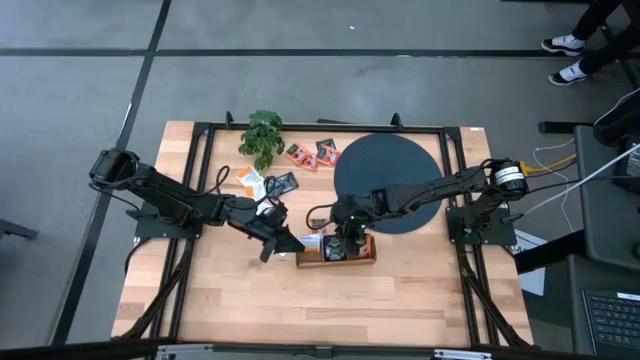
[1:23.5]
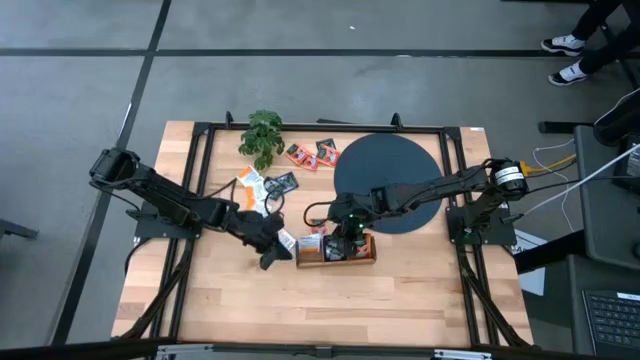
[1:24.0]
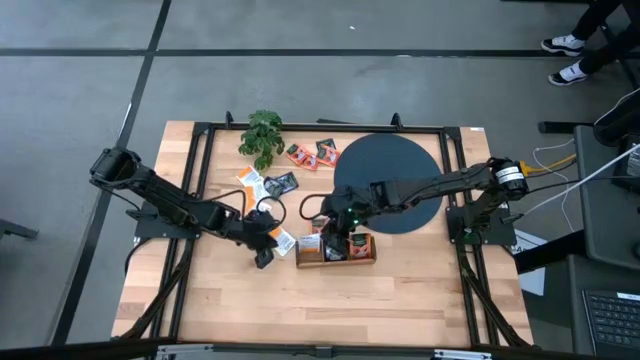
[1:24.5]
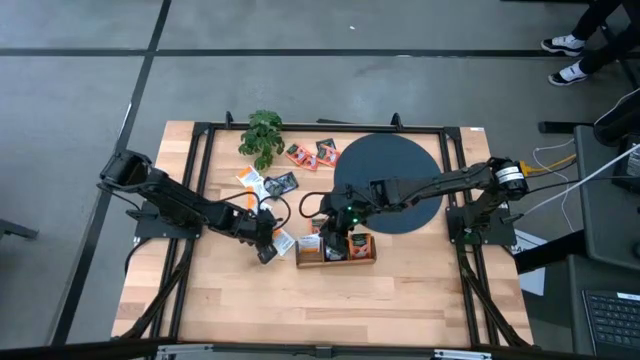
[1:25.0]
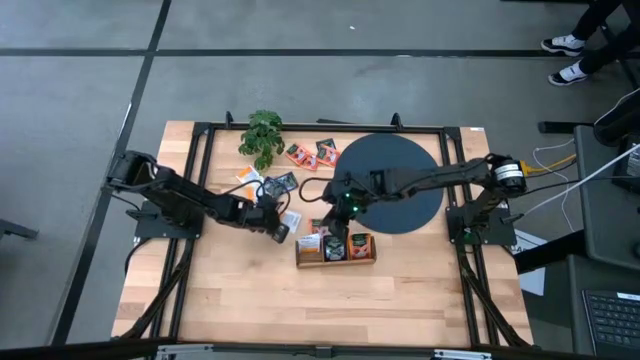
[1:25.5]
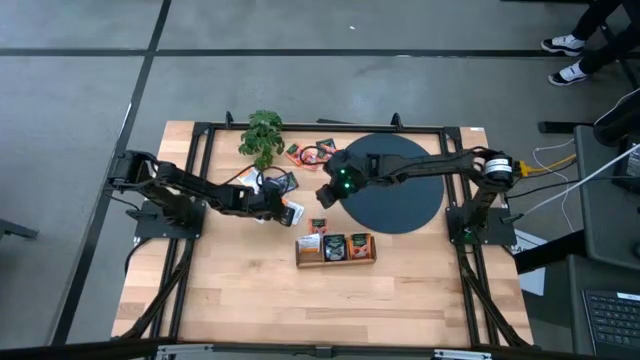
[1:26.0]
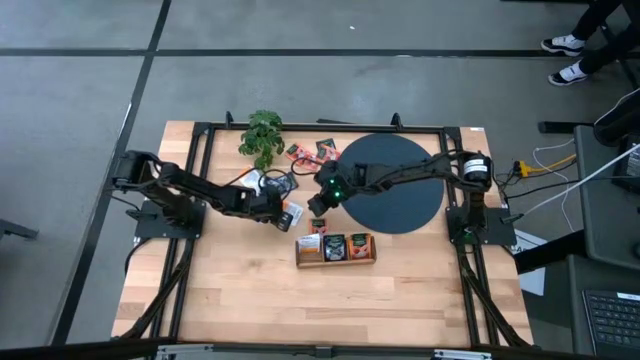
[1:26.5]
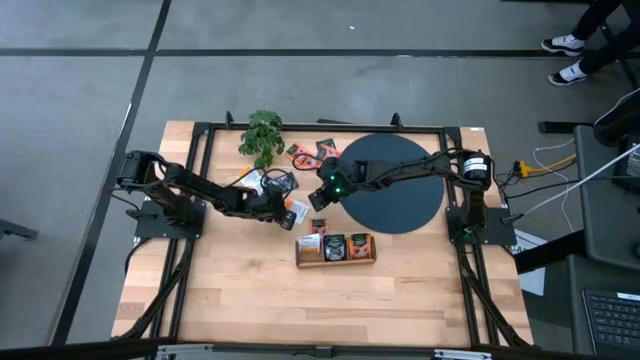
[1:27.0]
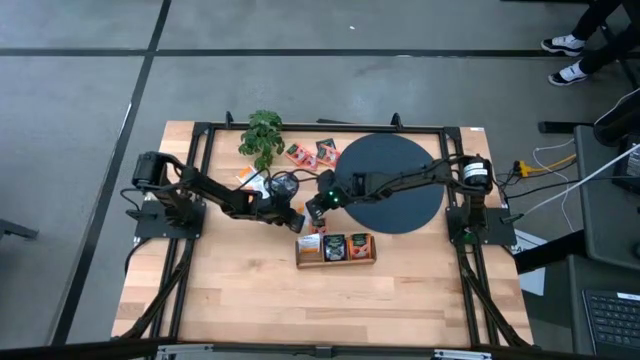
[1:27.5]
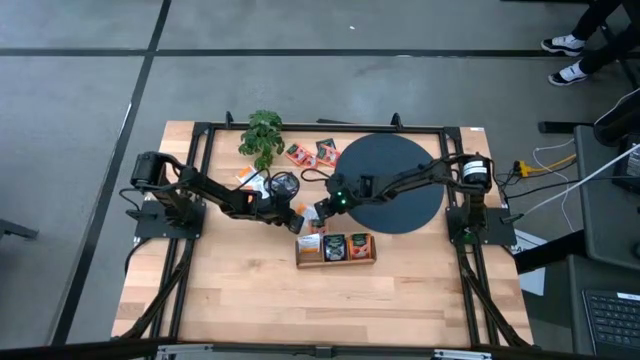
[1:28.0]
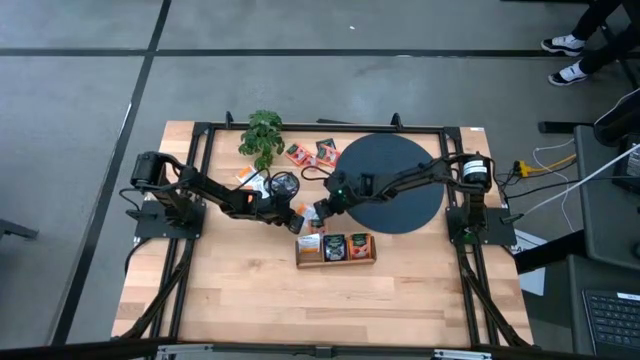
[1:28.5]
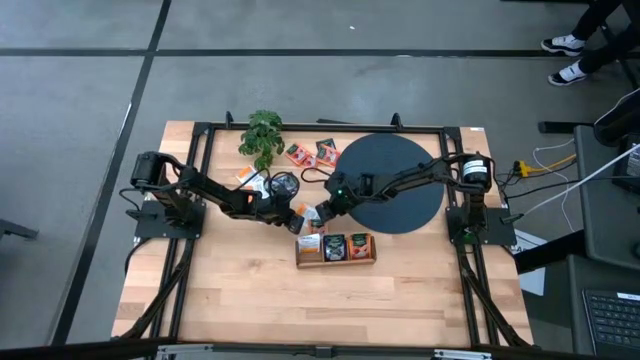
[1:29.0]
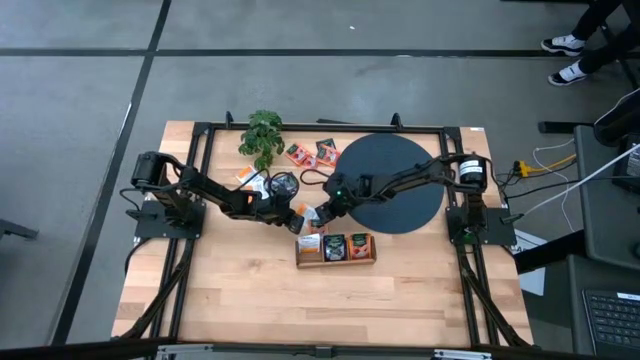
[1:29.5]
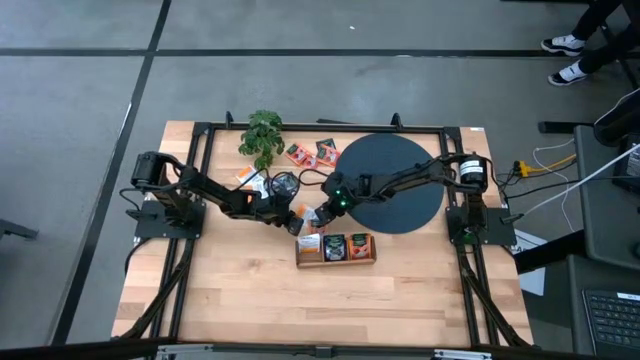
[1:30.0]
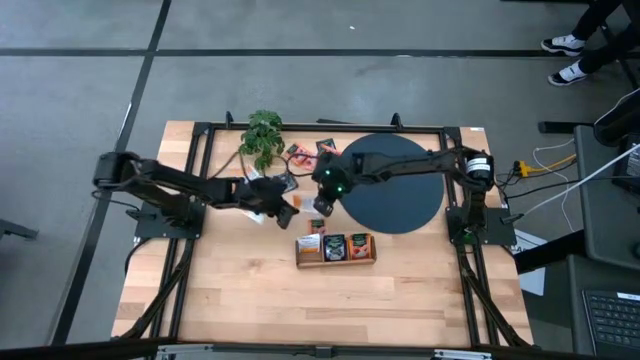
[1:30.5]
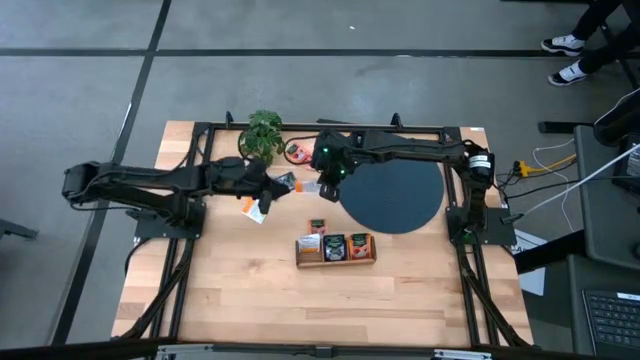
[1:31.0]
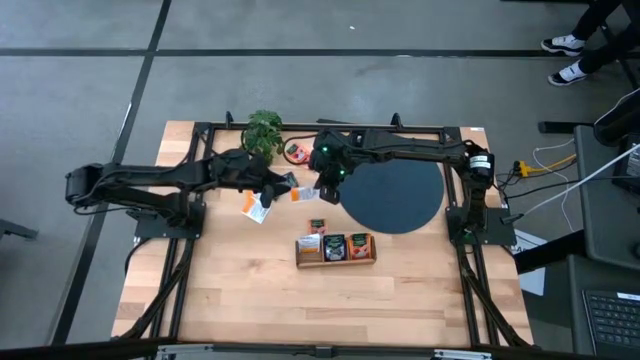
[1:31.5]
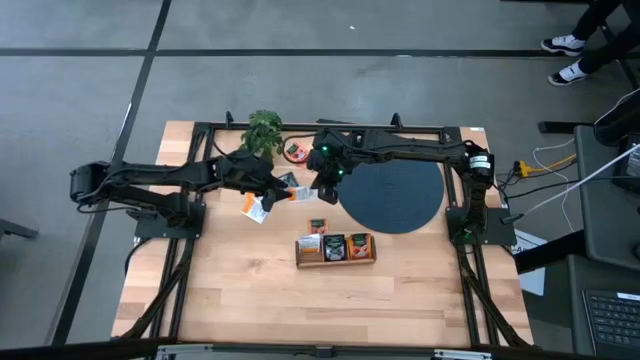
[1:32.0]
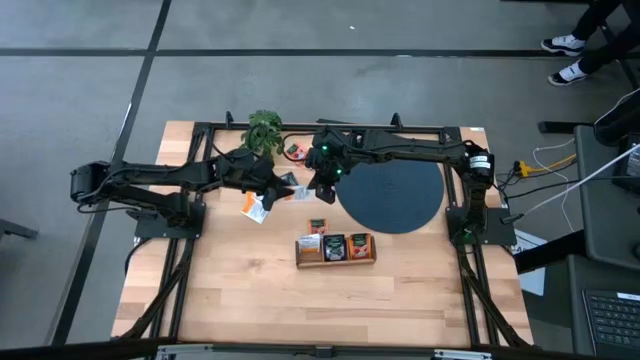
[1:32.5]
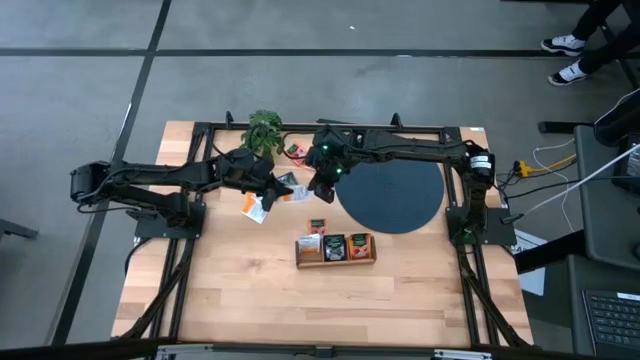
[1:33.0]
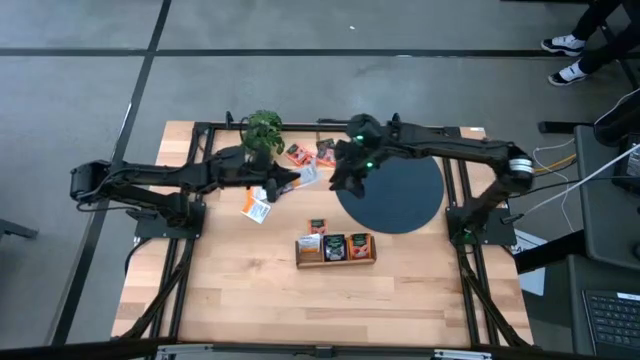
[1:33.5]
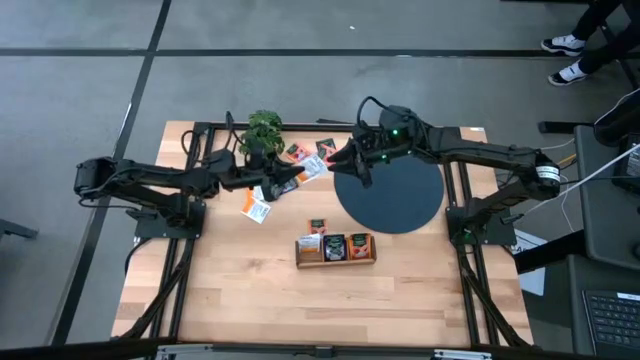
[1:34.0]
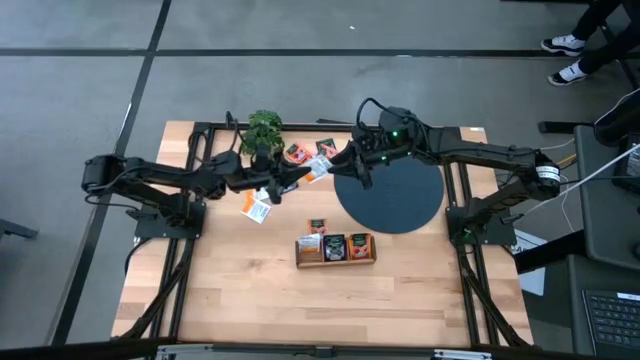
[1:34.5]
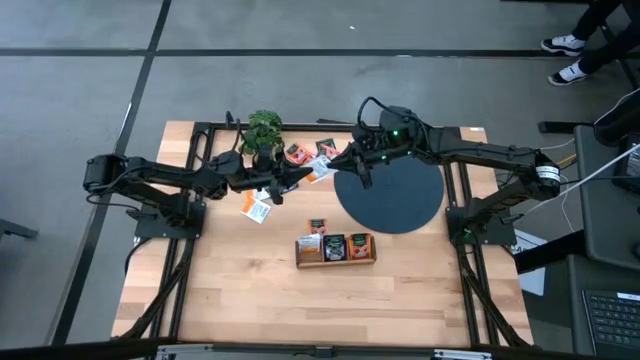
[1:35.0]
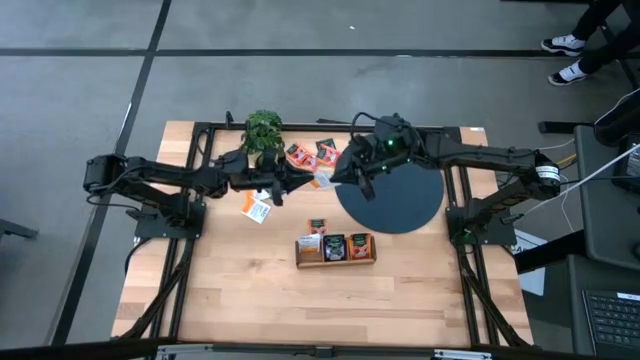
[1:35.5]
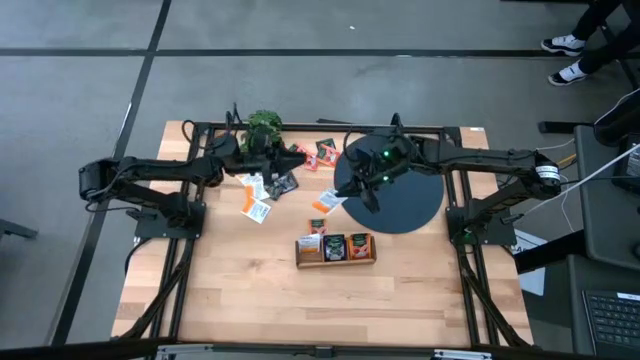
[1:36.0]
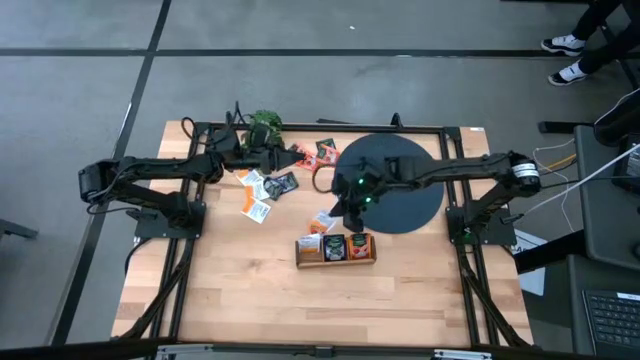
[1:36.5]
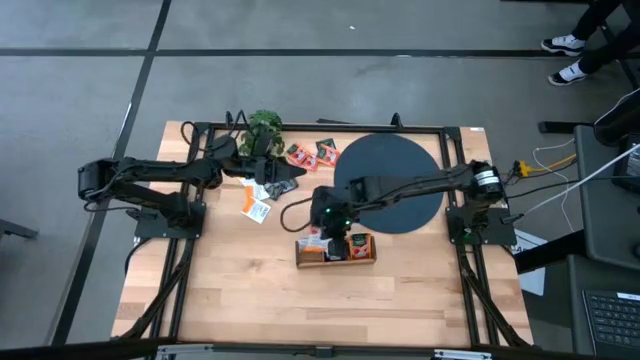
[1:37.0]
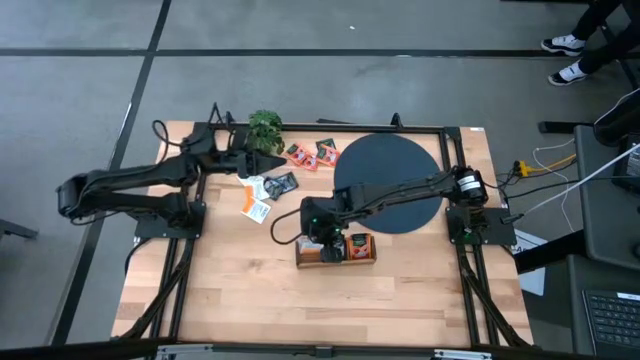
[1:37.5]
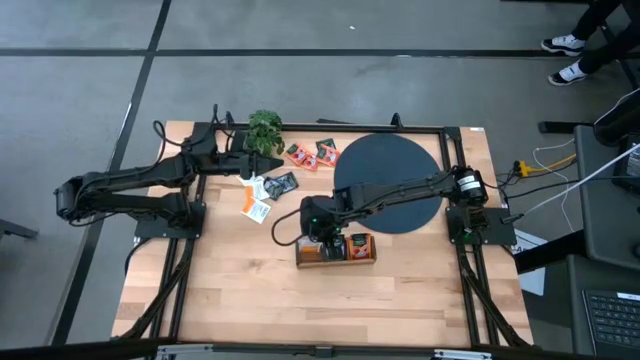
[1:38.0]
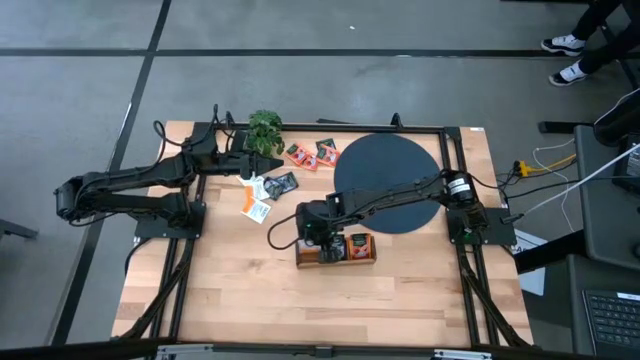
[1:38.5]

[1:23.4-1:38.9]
Task: Pick & Place Tea
Put the white tea bag into the left section of the wooden organizer

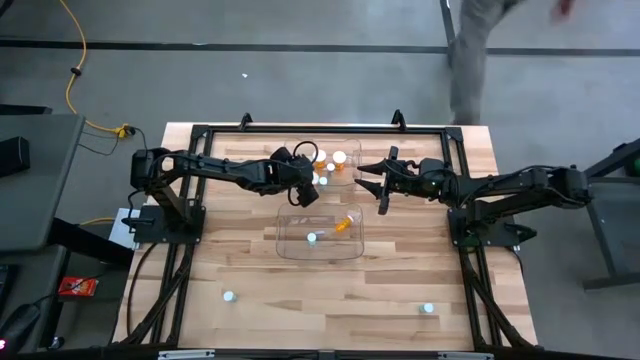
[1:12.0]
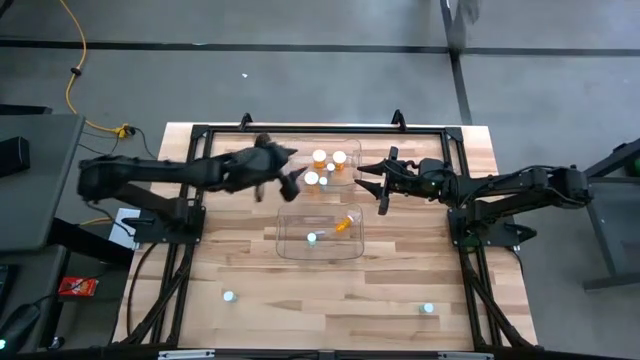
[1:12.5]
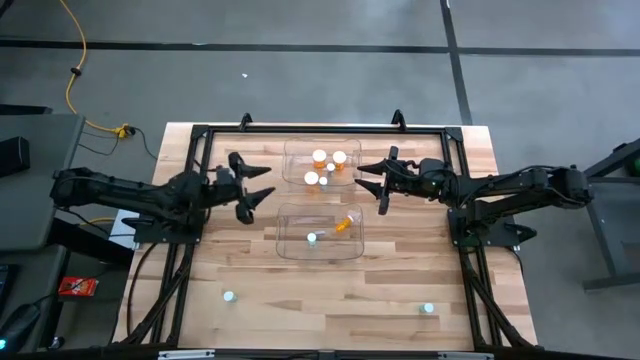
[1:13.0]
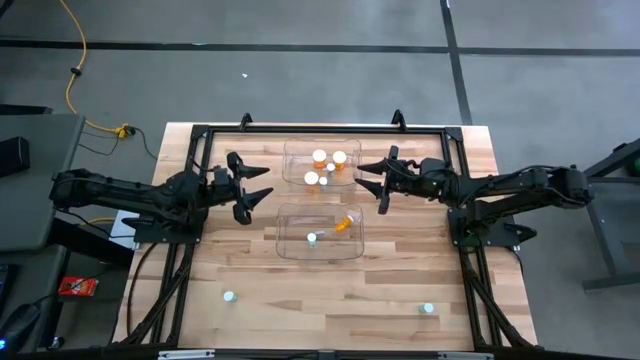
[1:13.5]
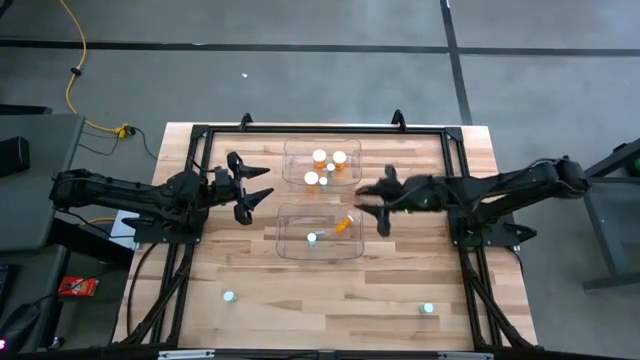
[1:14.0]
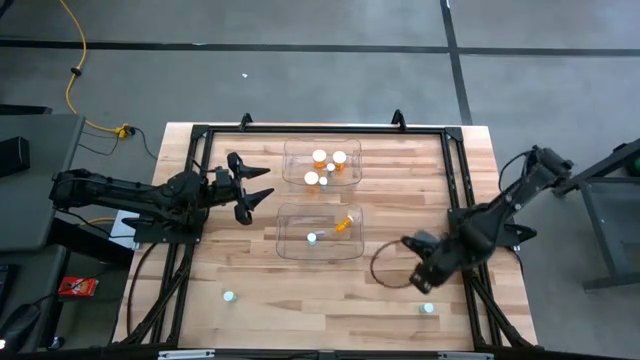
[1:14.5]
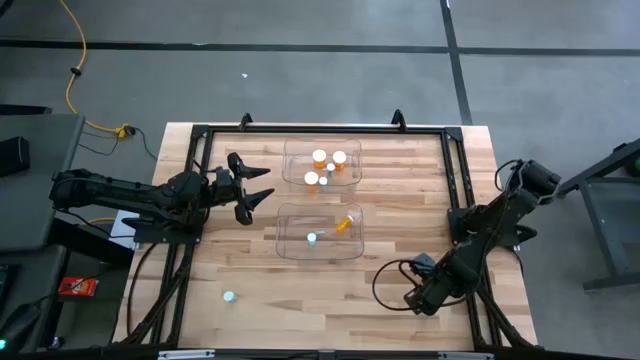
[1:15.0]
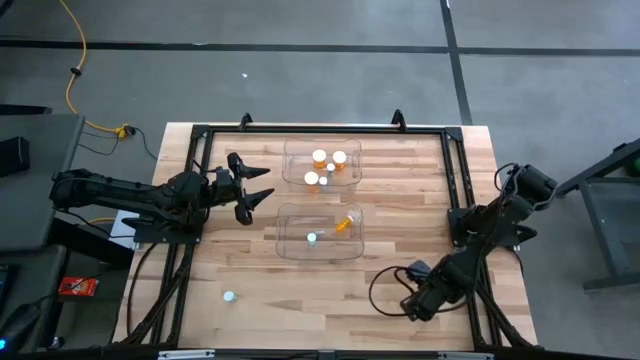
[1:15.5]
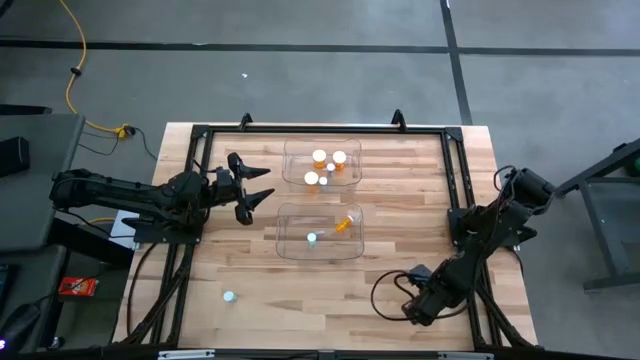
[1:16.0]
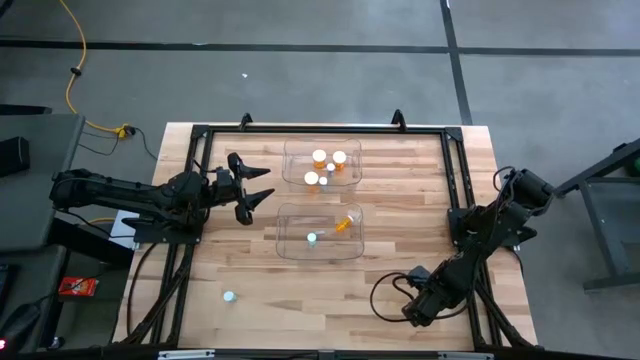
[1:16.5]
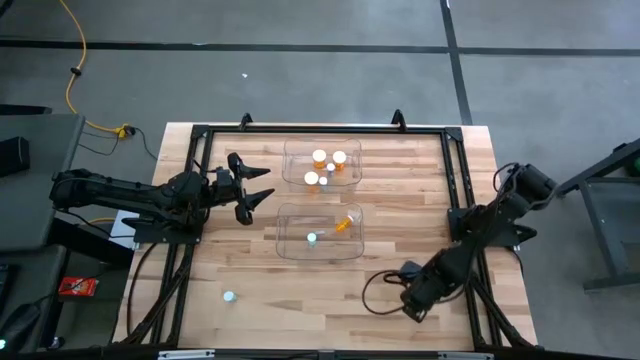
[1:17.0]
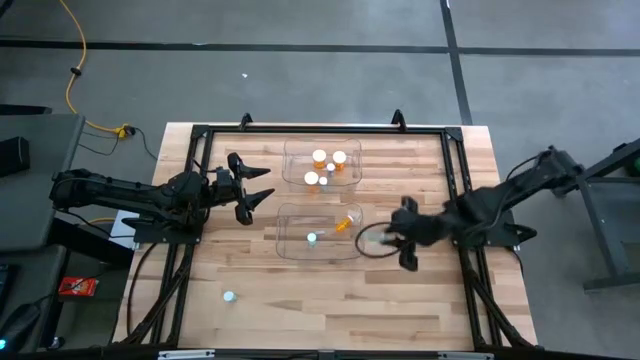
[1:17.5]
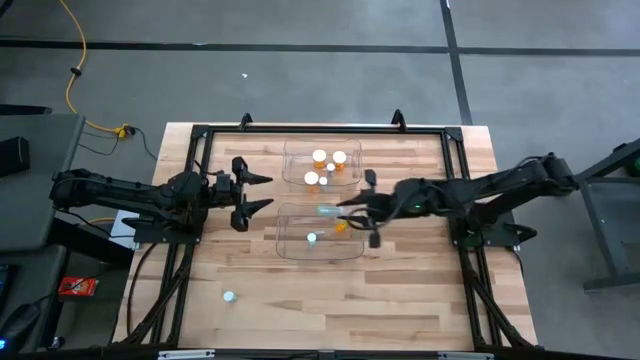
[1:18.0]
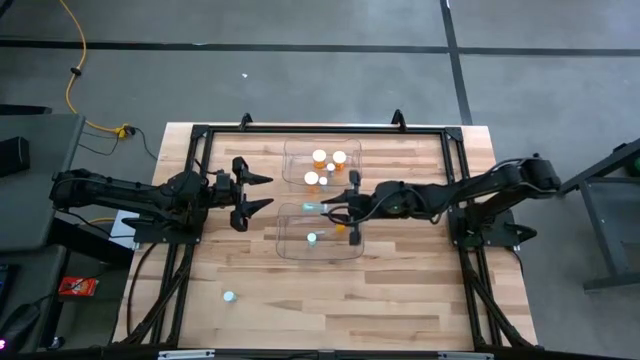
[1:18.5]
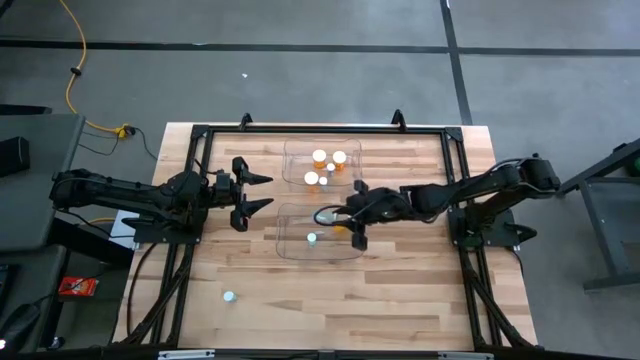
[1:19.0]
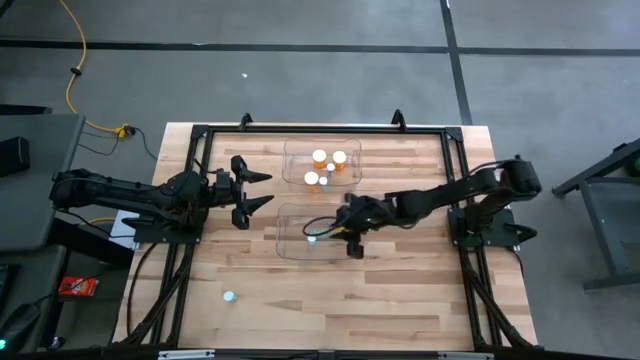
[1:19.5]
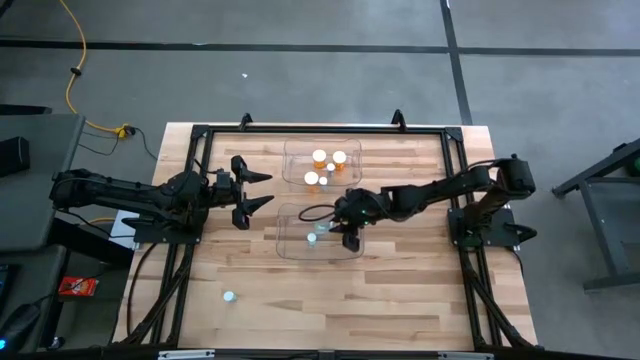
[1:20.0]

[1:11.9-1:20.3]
Task: Pick and place medicine bottles into bin by pill shape (circle, oval)
Put the blue tablet bottle into the bottom transparent bin
